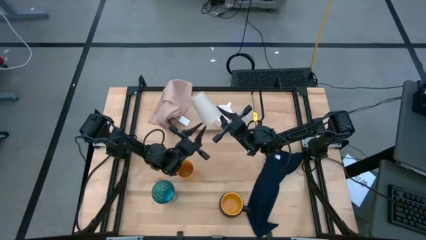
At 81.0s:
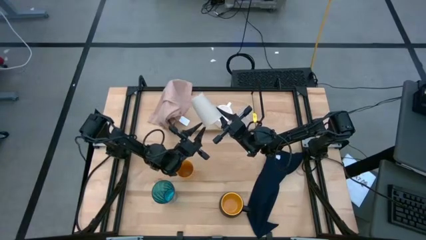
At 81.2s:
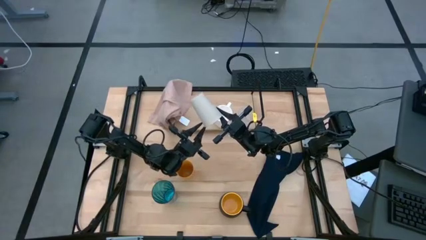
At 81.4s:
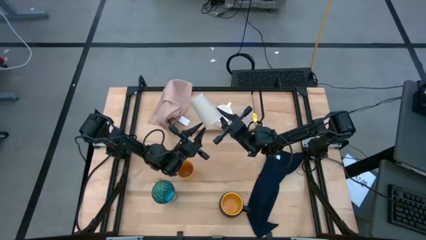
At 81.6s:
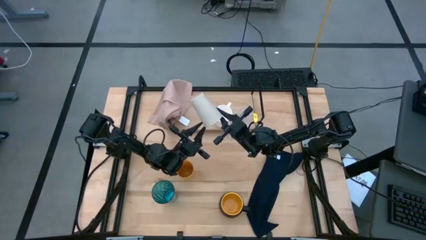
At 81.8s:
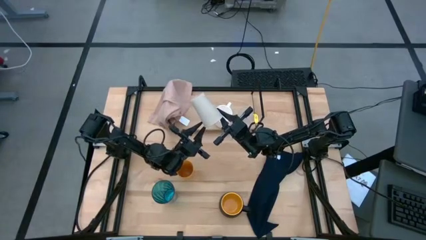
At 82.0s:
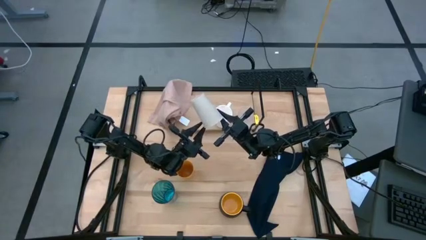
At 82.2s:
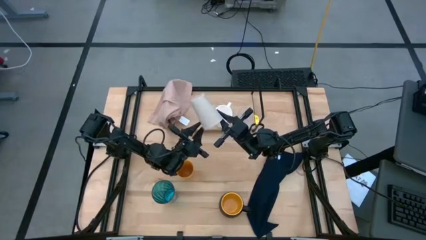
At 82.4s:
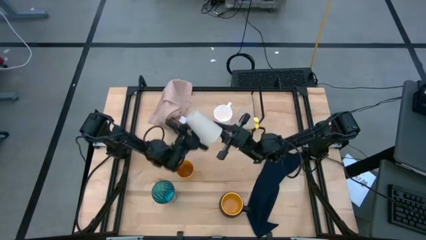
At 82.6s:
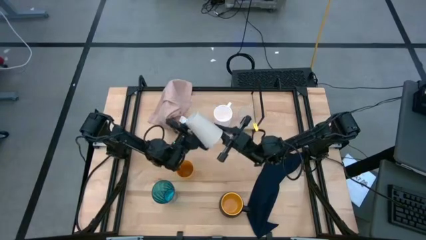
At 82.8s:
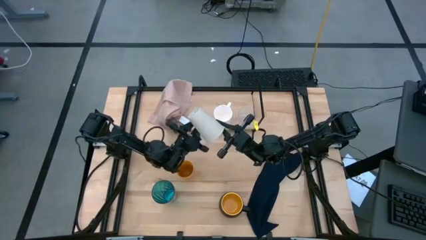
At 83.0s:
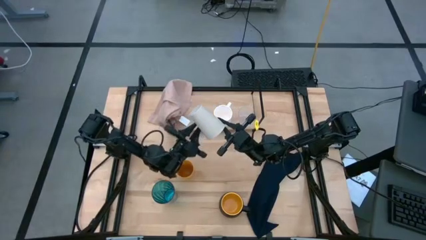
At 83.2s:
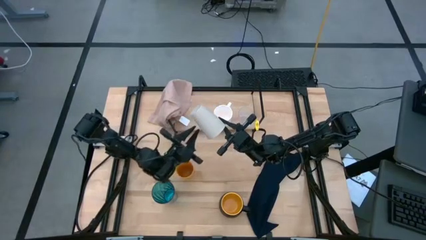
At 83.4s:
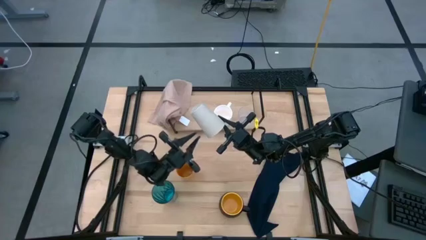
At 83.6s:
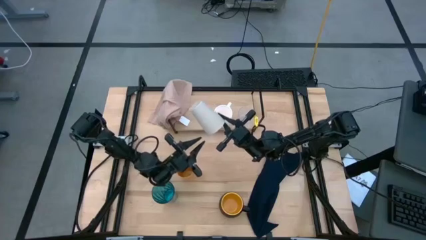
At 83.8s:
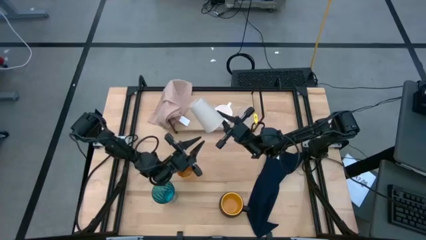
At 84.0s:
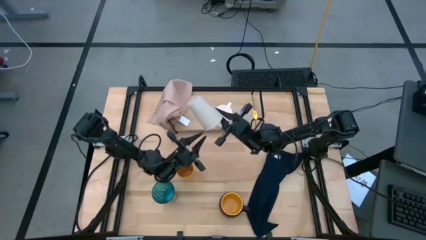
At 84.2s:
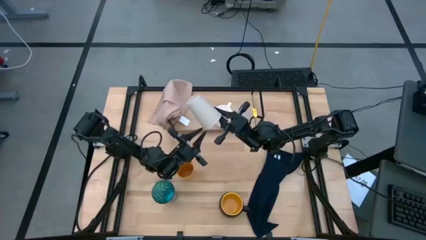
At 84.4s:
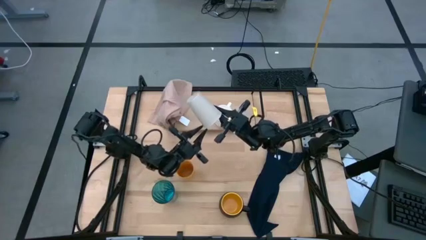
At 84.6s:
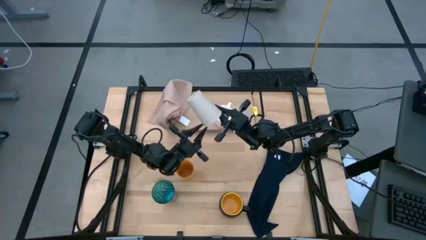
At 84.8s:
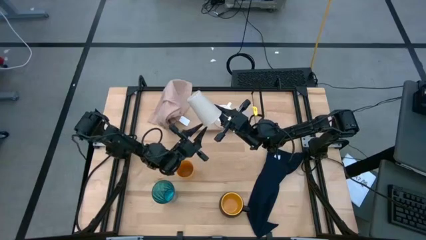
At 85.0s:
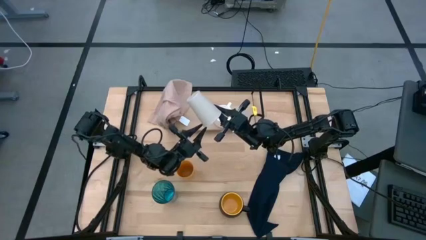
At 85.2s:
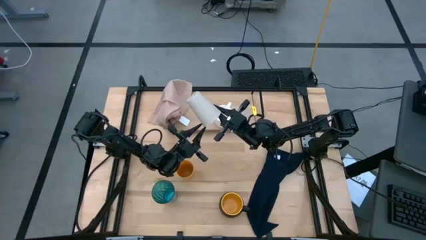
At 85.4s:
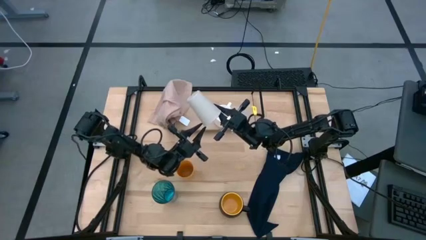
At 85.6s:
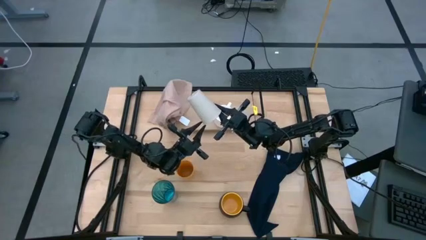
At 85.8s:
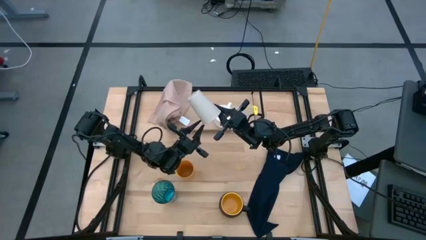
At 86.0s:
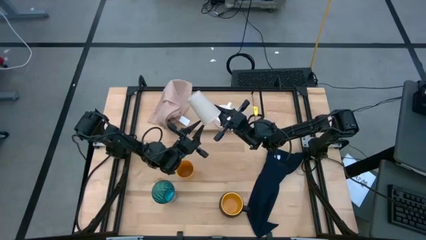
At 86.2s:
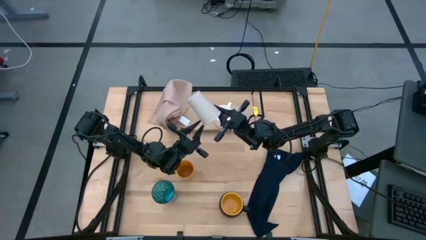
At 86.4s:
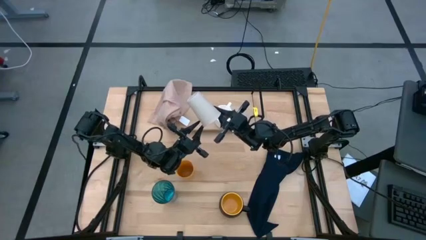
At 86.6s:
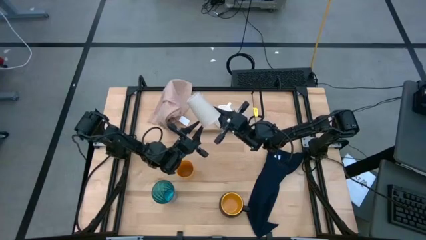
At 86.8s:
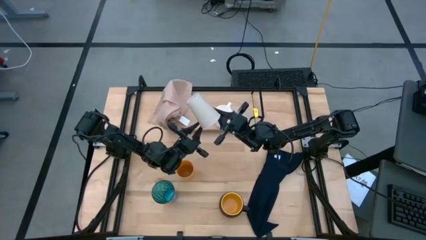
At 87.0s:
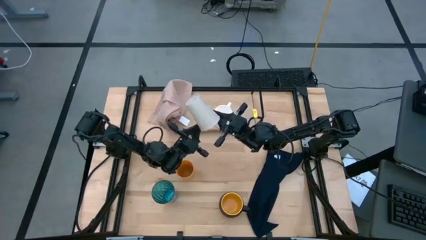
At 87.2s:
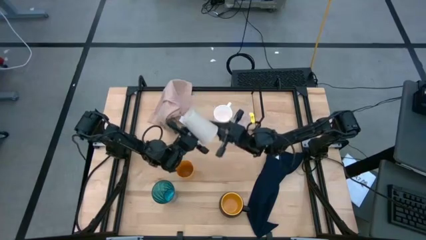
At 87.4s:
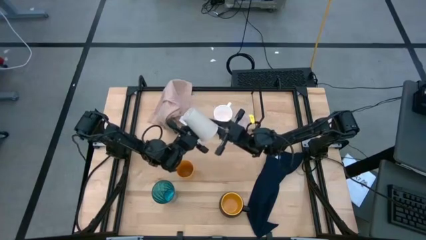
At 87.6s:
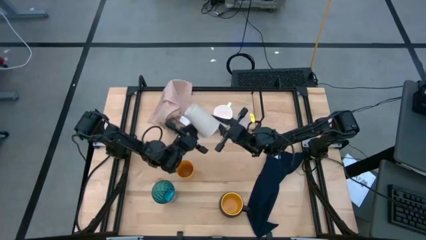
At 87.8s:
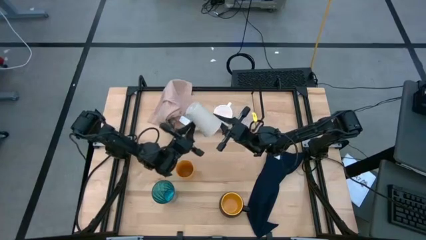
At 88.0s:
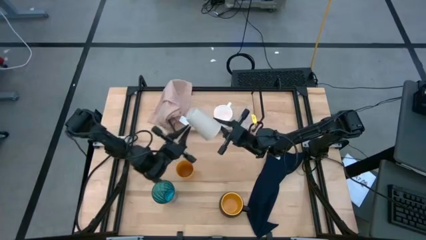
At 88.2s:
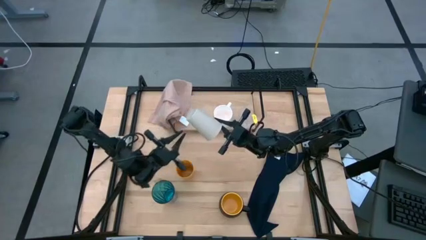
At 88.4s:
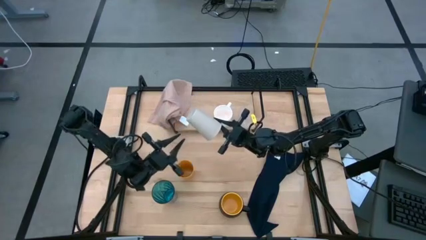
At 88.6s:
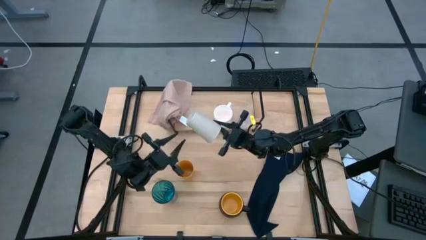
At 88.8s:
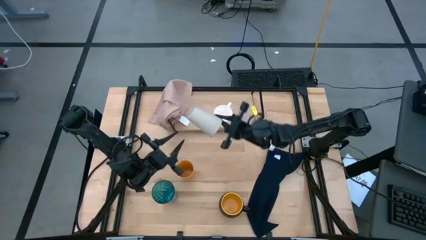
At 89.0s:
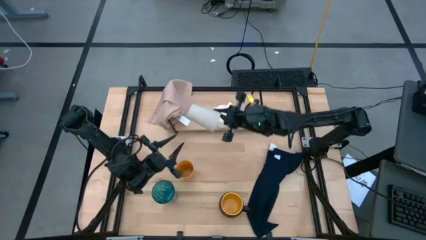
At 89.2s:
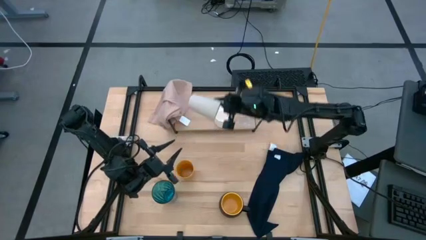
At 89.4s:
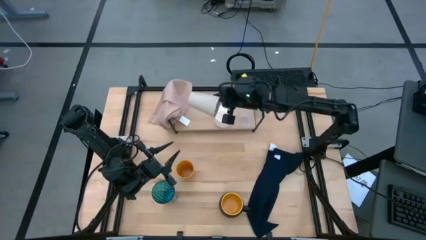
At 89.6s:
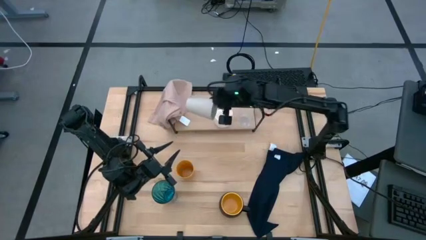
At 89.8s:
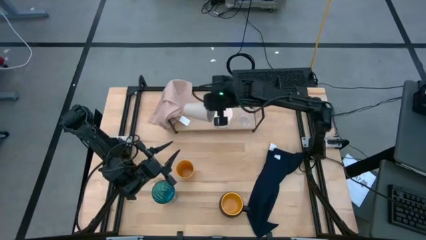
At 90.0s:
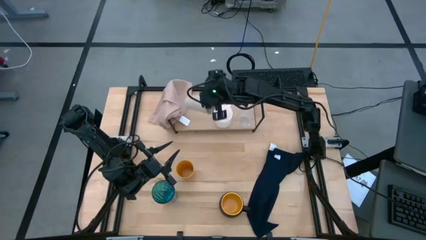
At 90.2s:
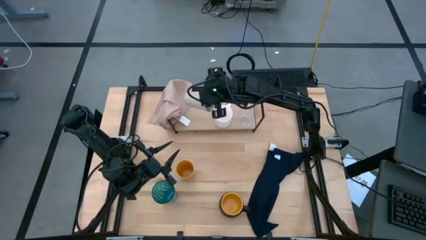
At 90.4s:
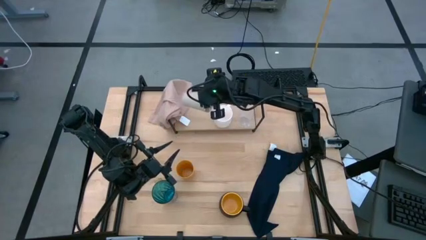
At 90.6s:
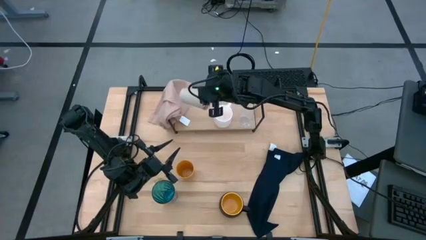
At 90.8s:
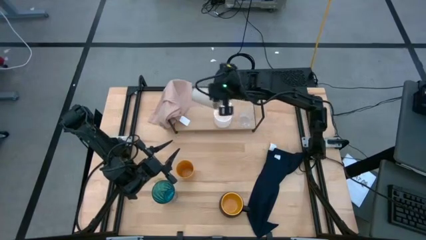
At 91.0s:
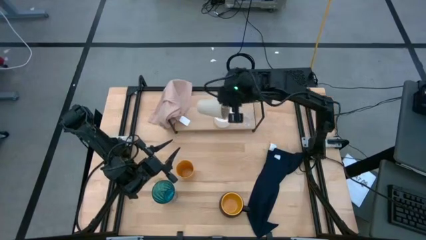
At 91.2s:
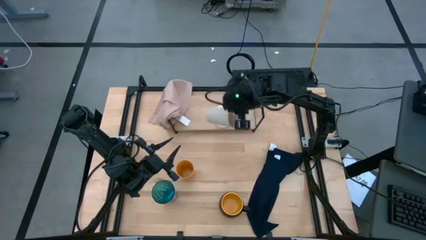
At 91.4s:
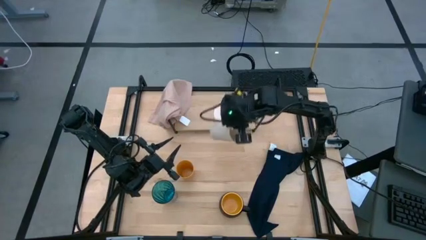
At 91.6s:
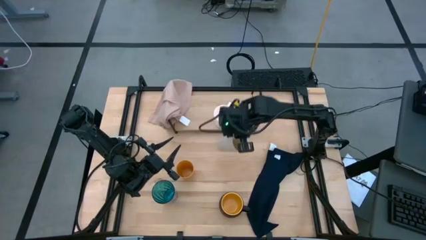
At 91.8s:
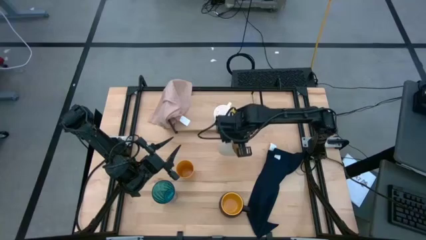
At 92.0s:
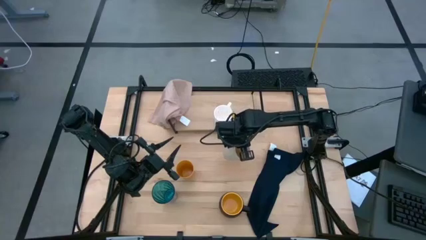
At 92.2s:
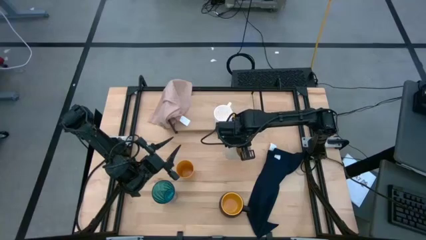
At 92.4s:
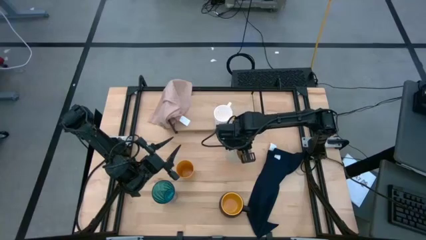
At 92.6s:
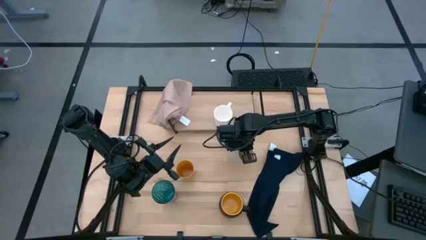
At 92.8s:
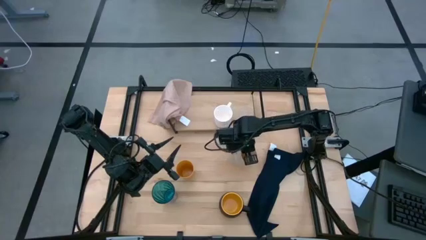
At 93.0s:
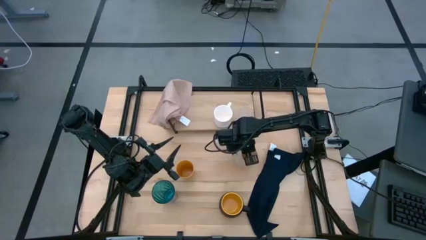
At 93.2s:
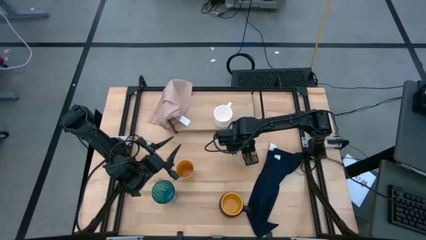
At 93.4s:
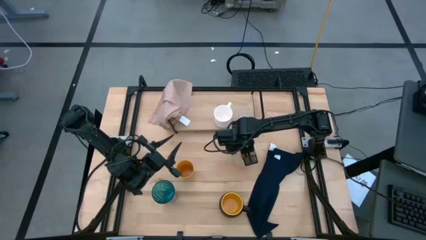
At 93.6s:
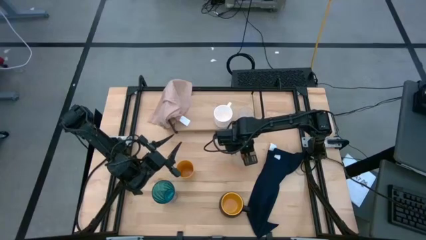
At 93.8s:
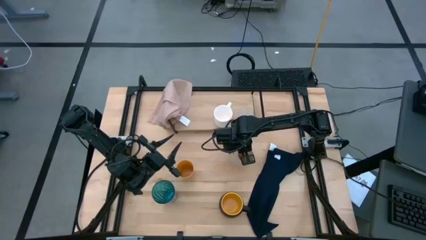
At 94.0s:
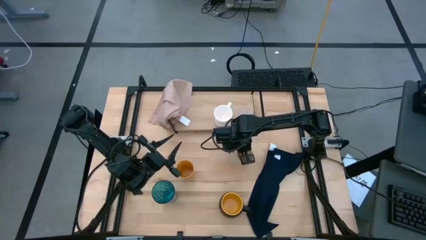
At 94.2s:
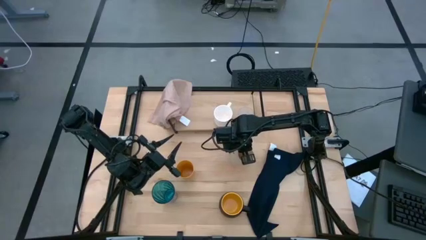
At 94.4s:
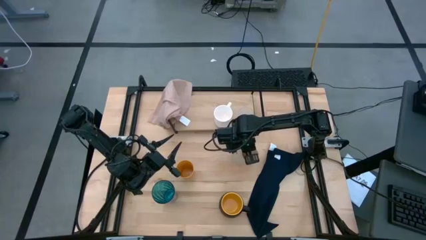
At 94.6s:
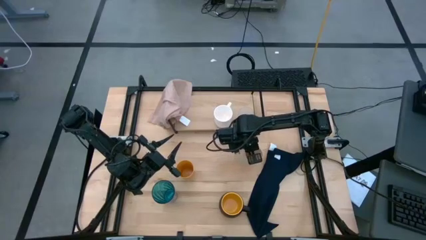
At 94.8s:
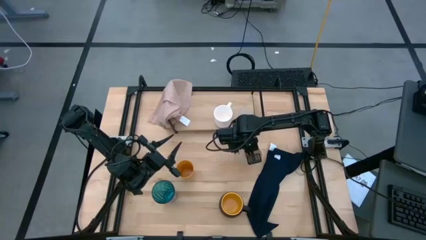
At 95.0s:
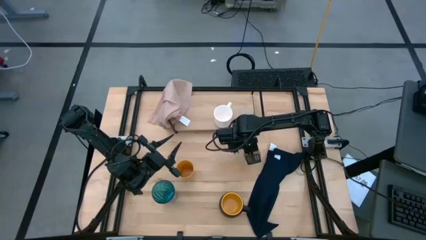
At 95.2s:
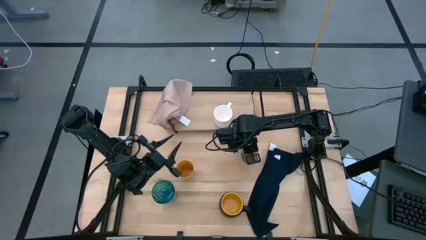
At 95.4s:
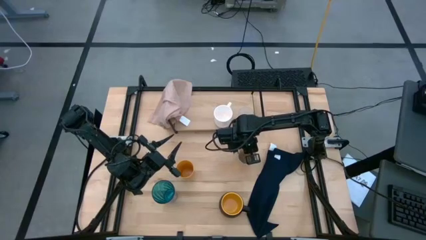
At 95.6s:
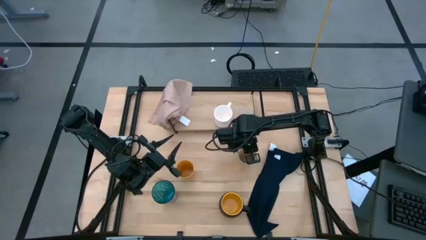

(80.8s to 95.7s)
Task: Stack small to large cups/mugs on shelf
Put the light brown cup on the shelf
